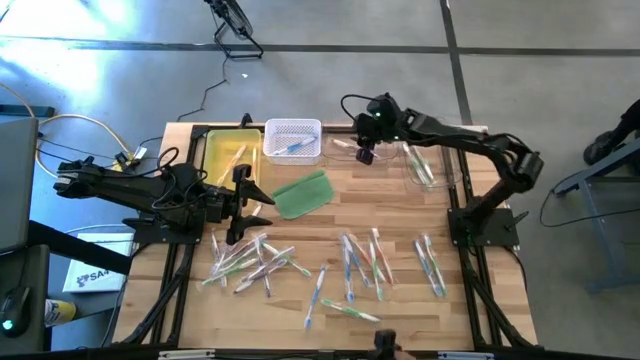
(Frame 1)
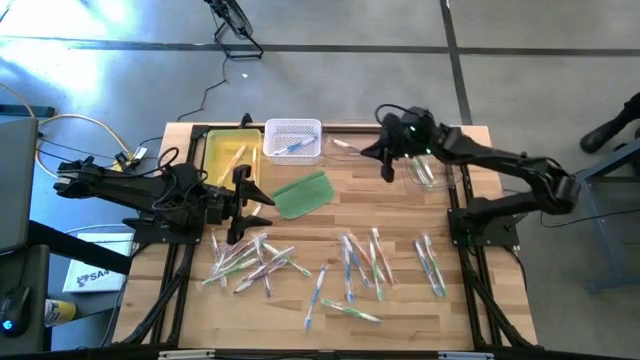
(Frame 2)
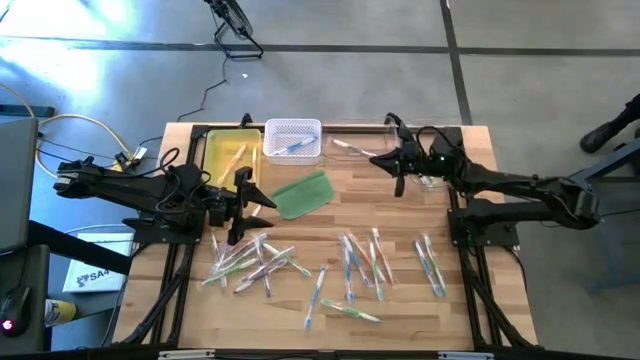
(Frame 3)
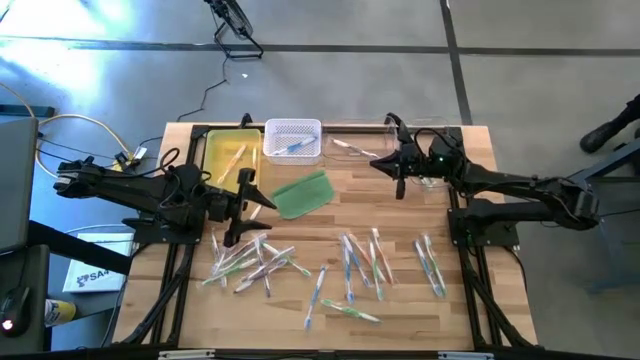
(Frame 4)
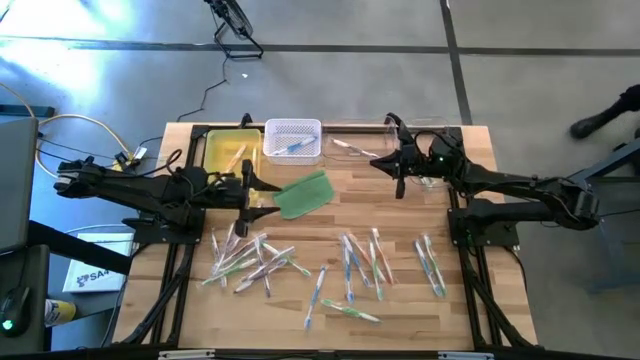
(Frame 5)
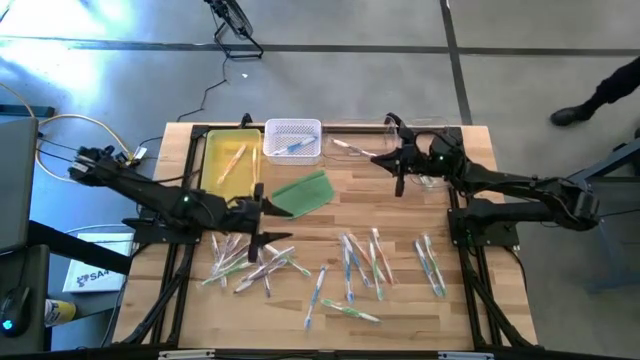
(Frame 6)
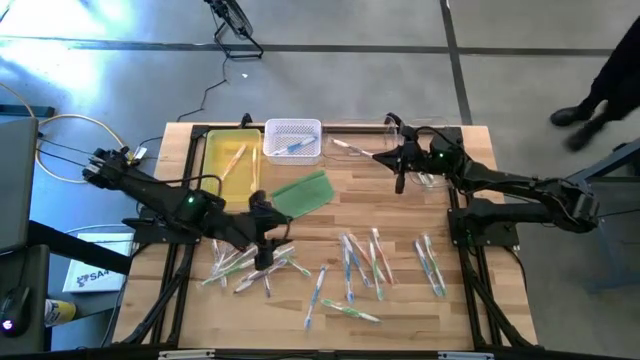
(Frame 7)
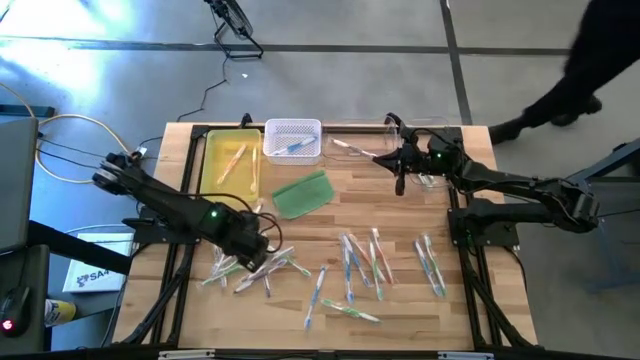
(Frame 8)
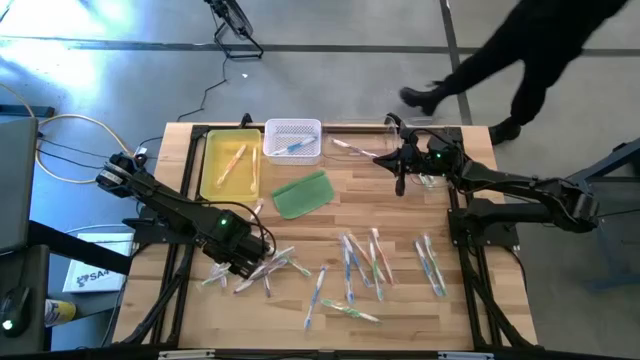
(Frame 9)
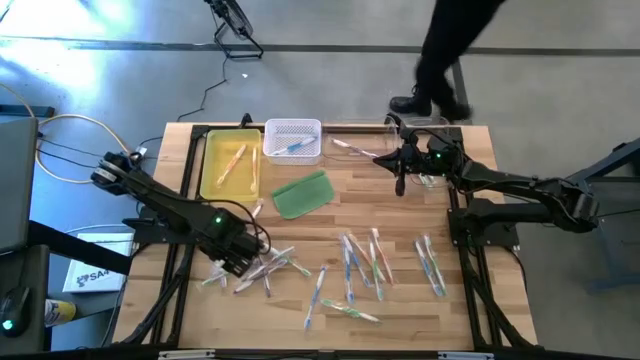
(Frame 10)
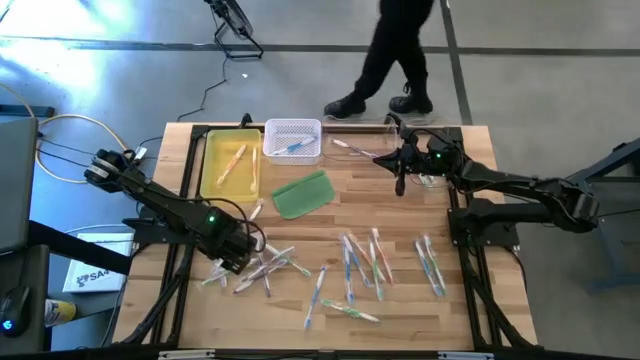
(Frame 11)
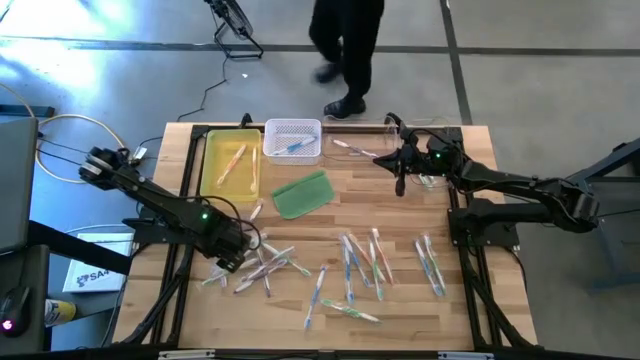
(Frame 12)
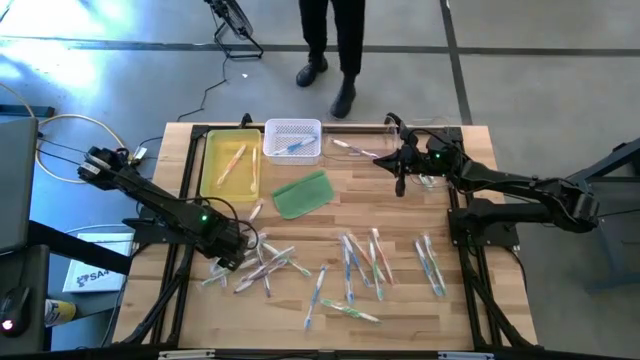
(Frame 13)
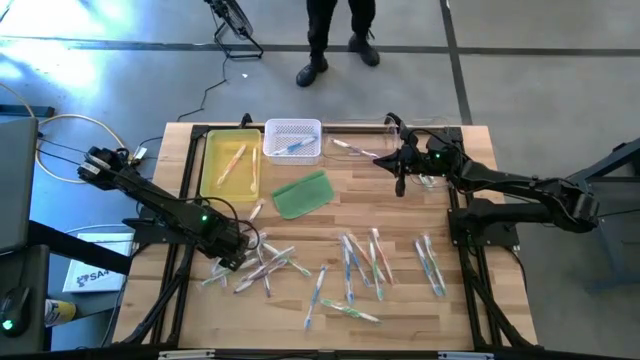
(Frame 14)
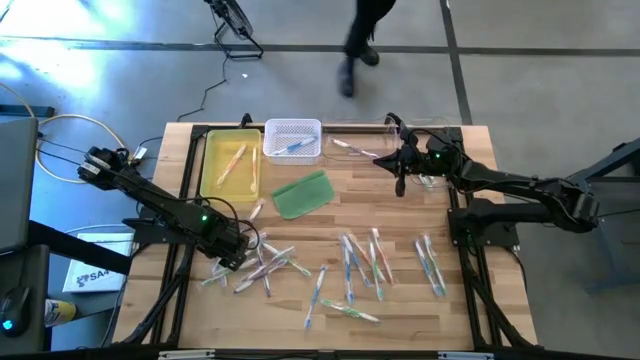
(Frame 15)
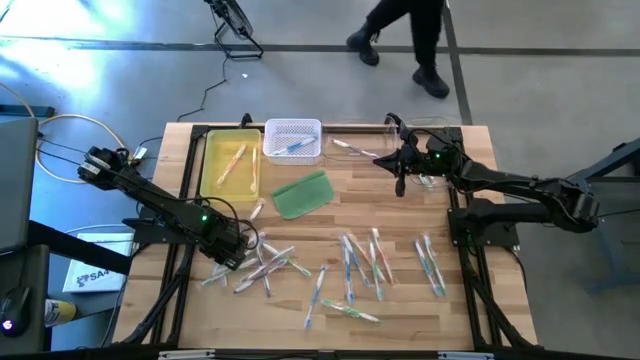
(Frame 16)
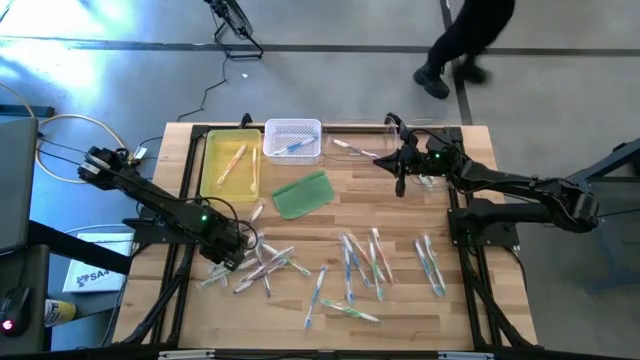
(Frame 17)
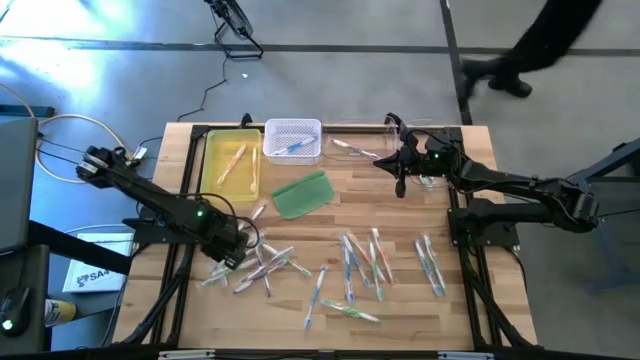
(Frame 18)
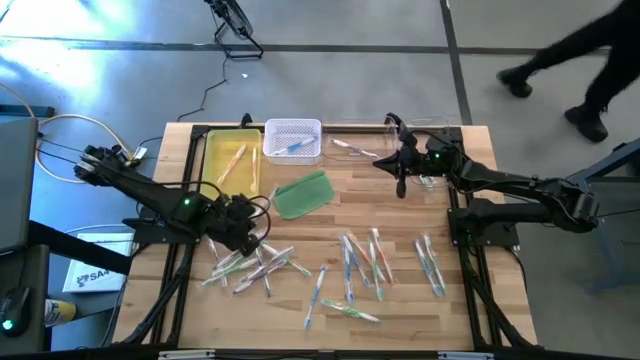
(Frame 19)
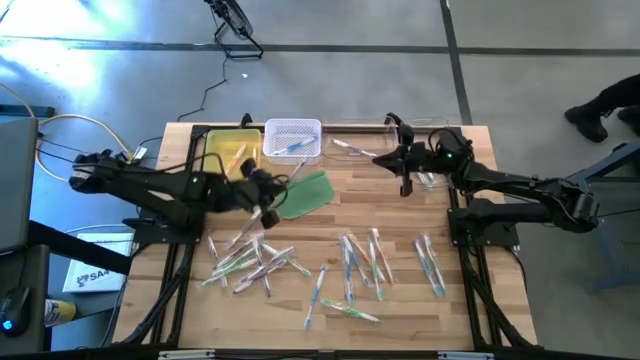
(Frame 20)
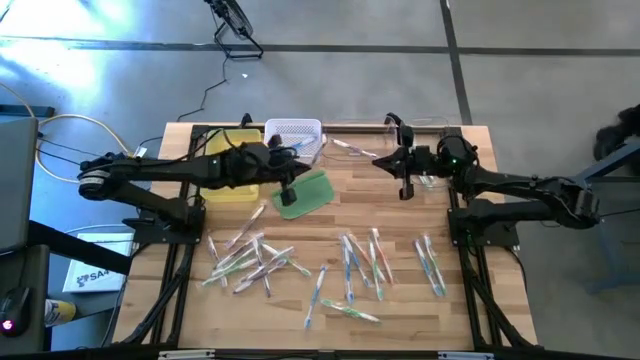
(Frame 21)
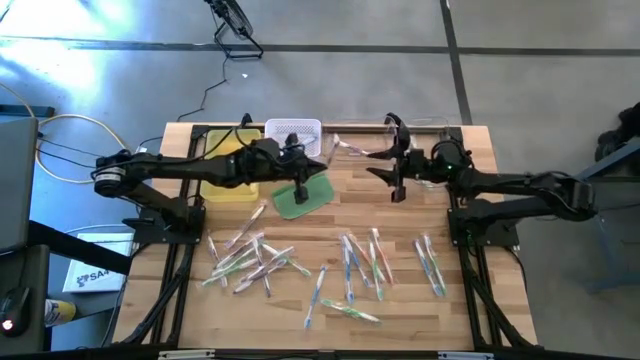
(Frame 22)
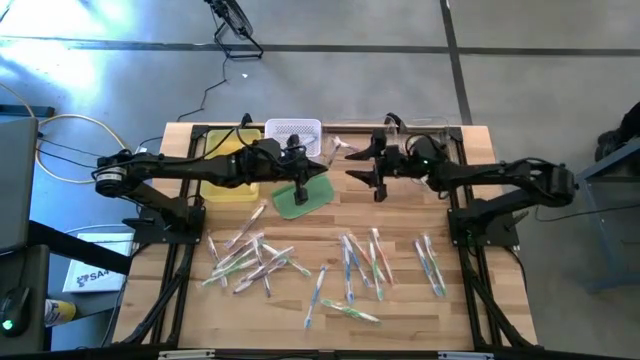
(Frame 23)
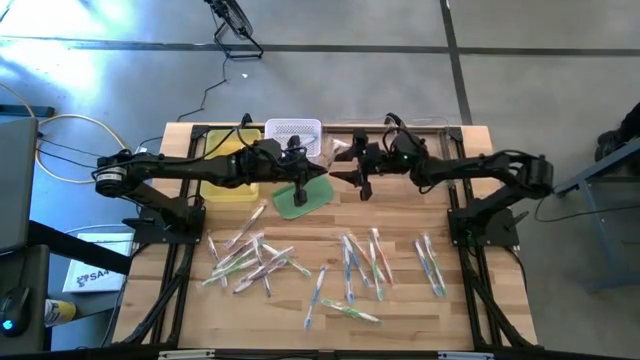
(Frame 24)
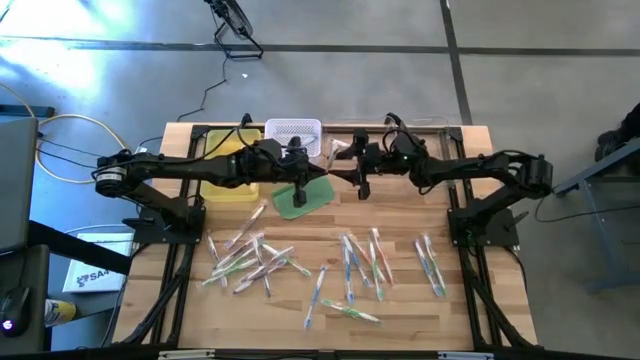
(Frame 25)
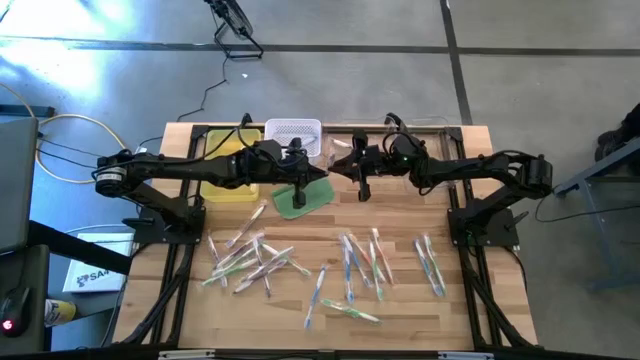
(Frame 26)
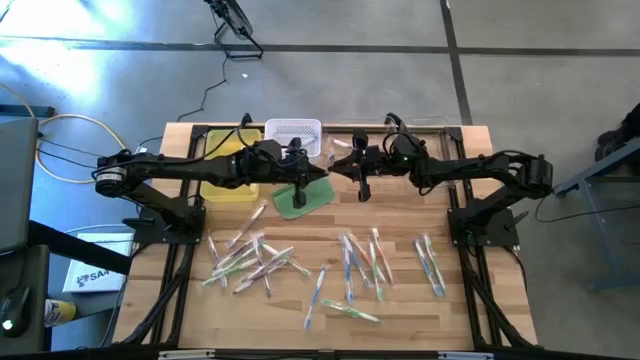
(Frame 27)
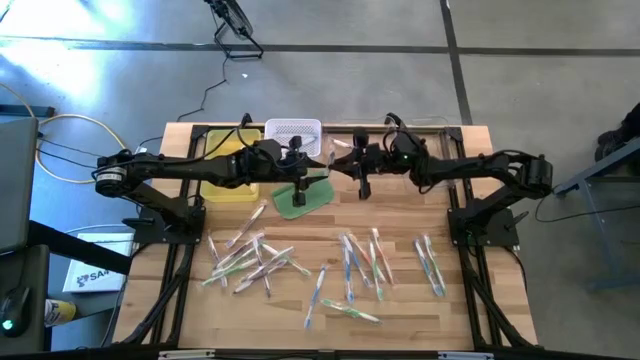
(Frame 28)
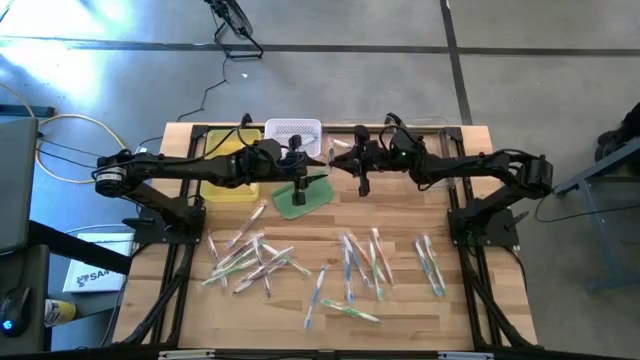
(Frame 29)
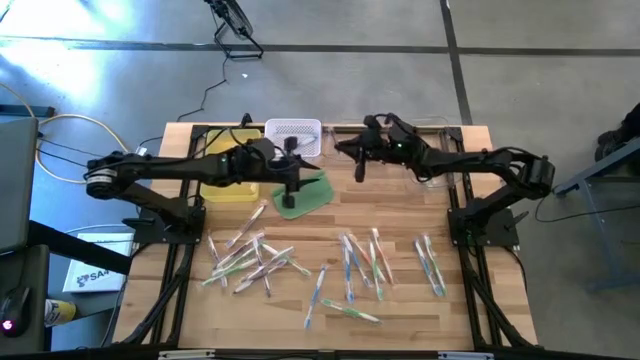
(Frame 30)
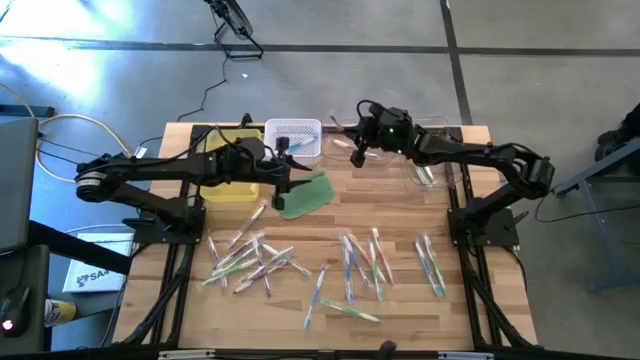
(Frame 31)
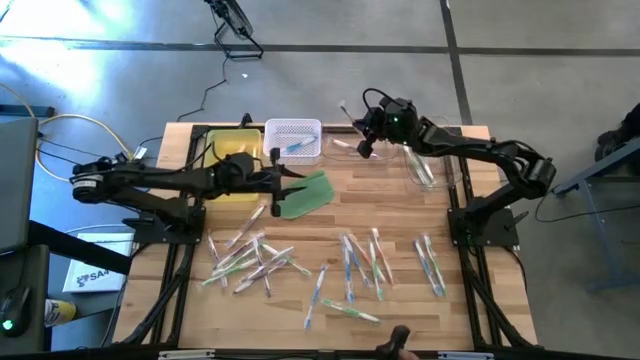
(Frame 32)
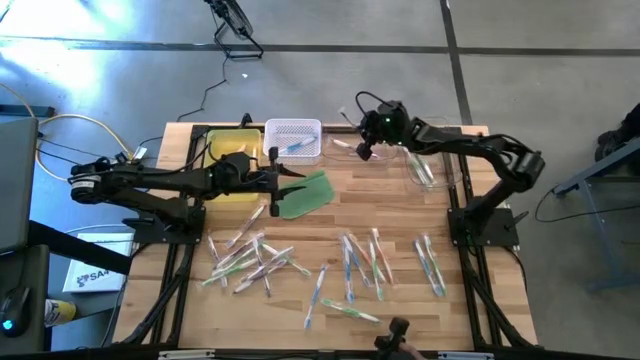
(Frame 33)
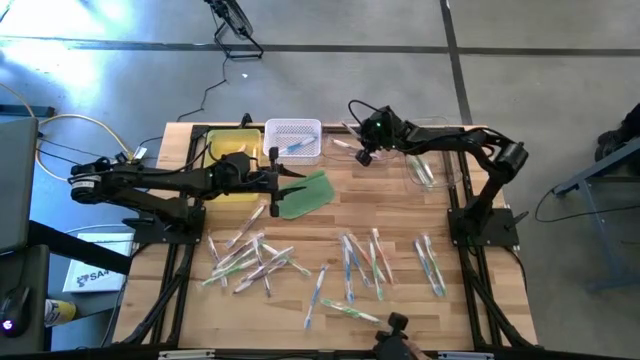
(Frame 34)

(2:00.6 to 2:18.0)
Task: Pick & Place Toothbrushes
Put the violet toothbrush into the left transparent bin

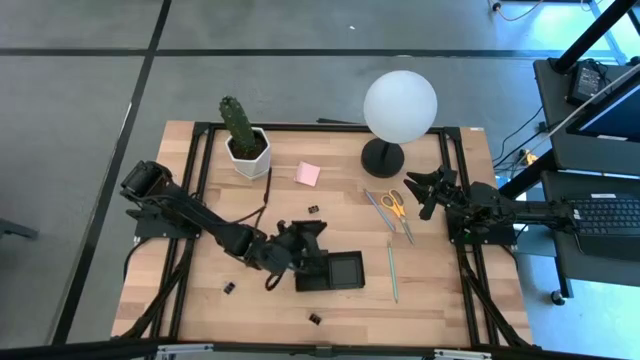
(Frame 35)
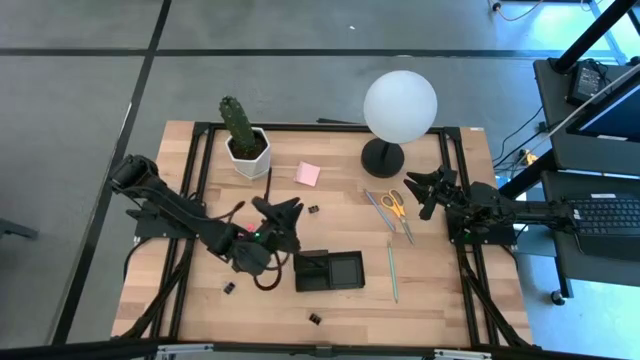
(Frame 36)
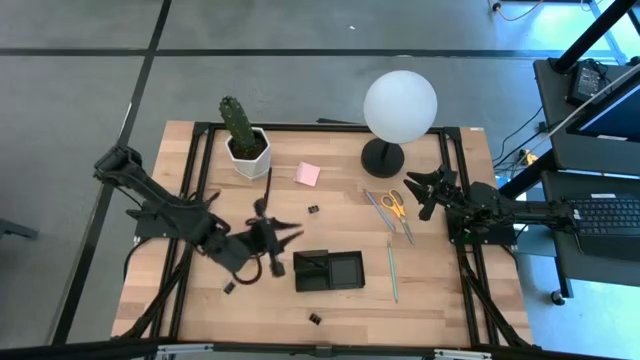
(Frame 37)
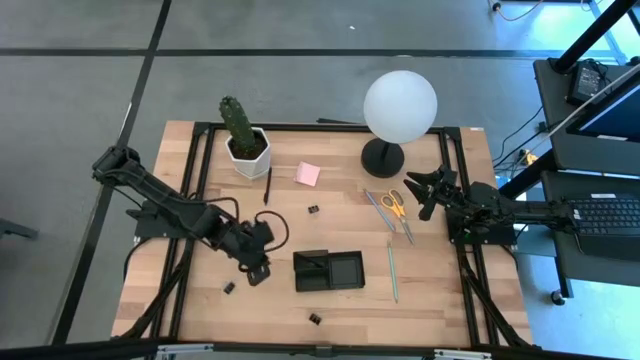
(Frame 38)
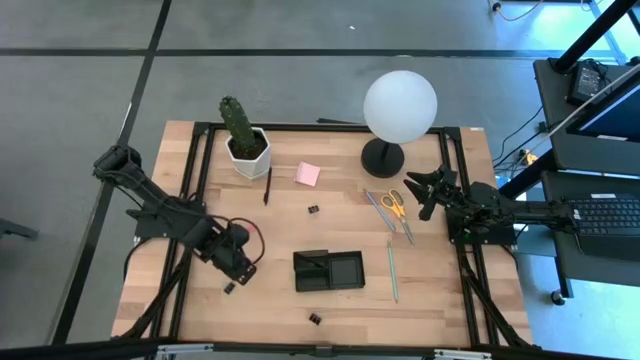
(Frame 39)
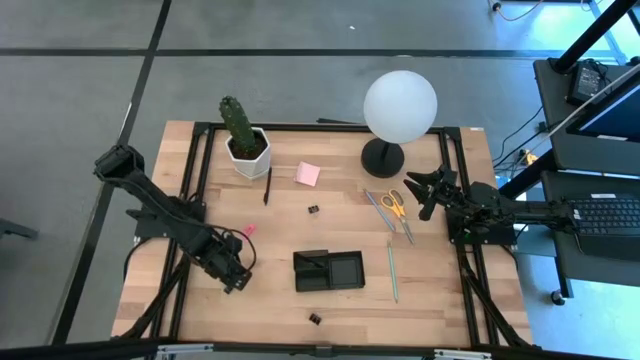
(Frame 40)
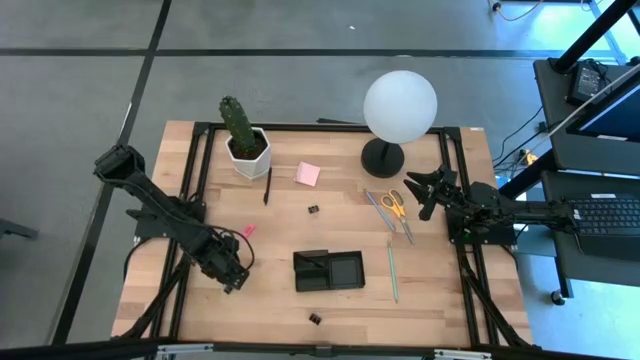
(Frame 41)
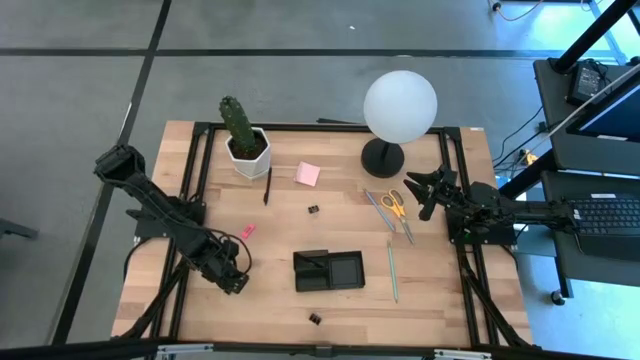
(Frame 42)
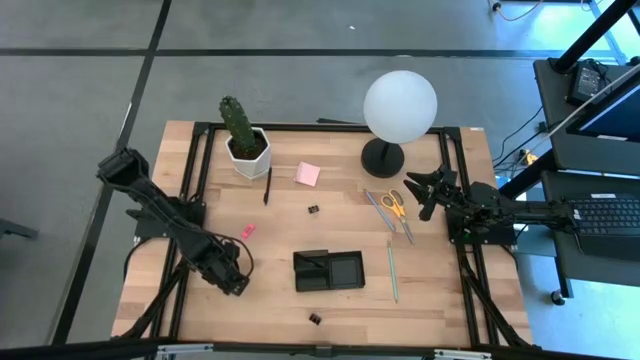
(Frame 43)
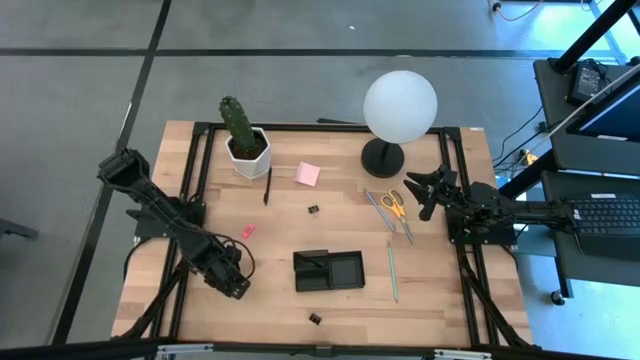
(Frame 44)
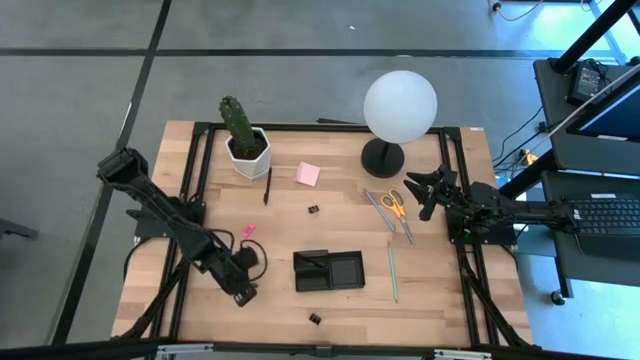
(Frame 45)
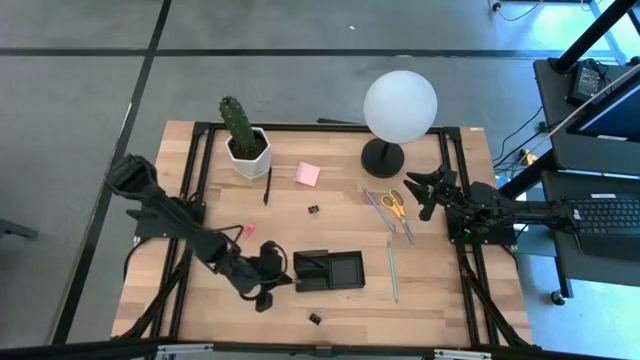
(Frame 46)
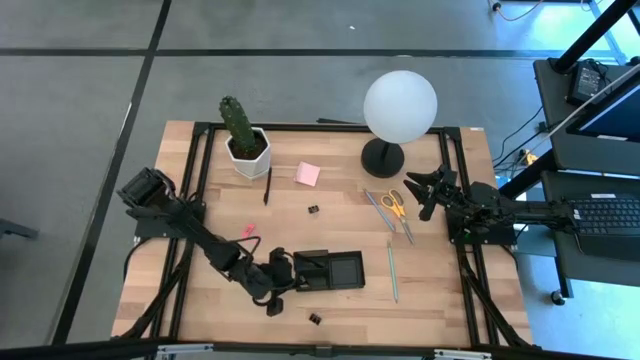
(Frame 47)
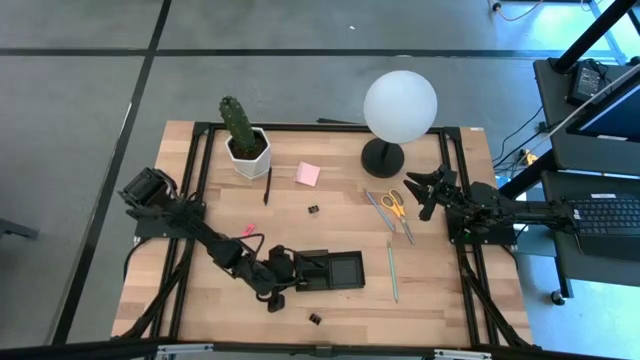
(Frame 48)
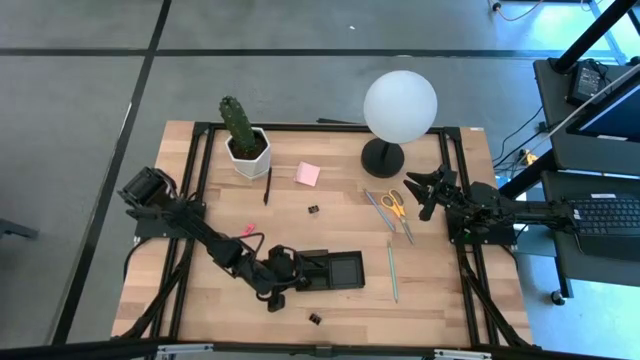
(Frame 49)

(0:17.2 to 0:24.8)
Task: Pick and place office supplies into organizer
Put the left black binder clip into the mesh desk organizer
